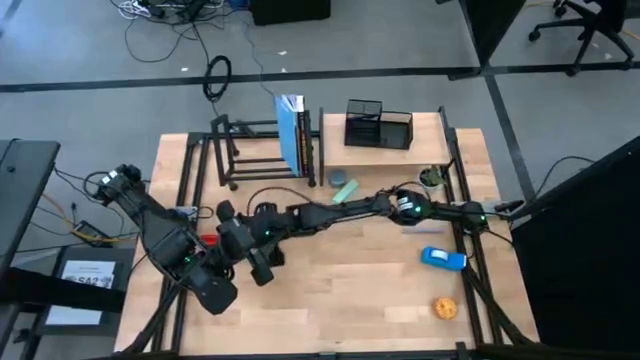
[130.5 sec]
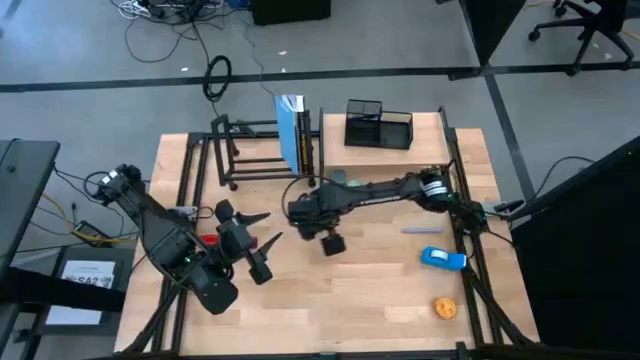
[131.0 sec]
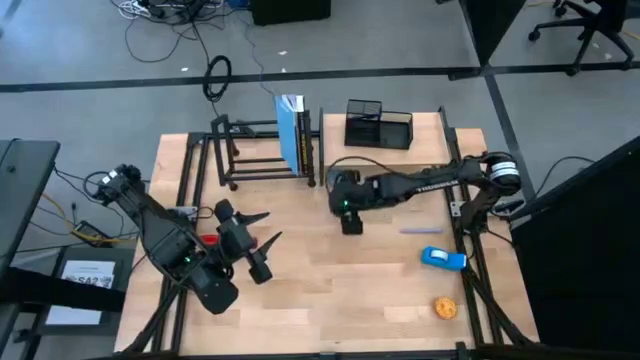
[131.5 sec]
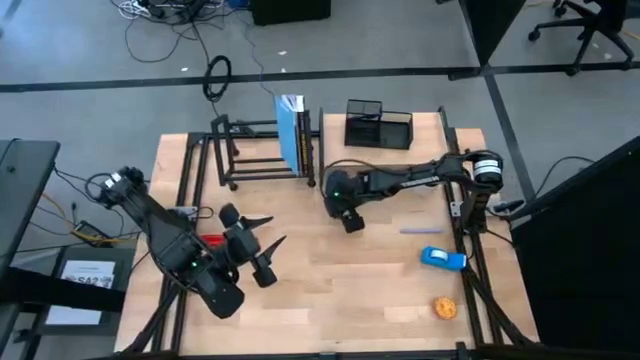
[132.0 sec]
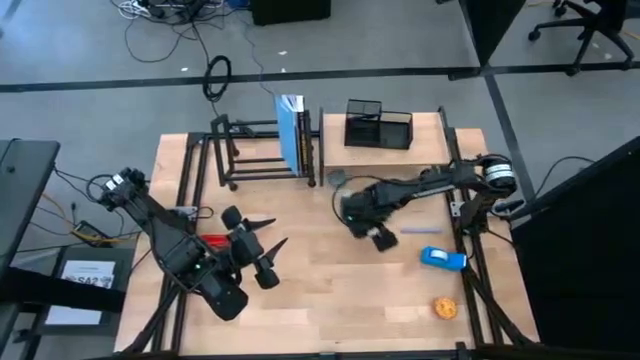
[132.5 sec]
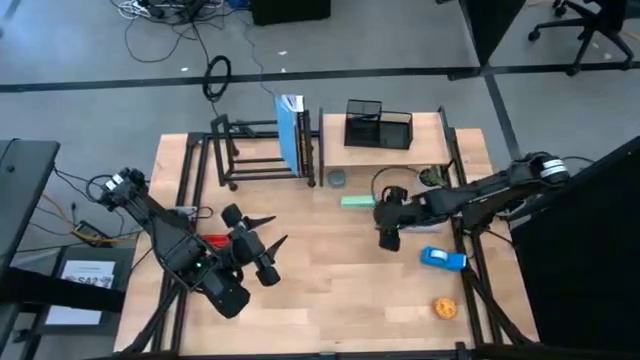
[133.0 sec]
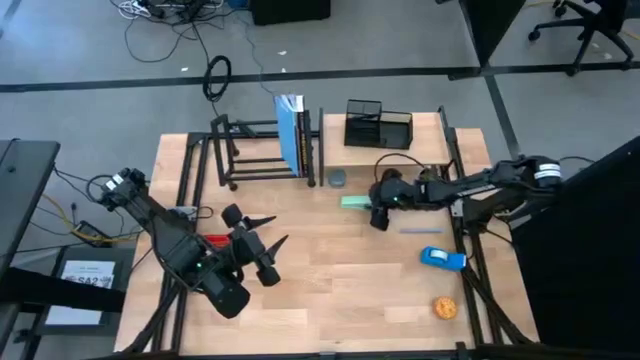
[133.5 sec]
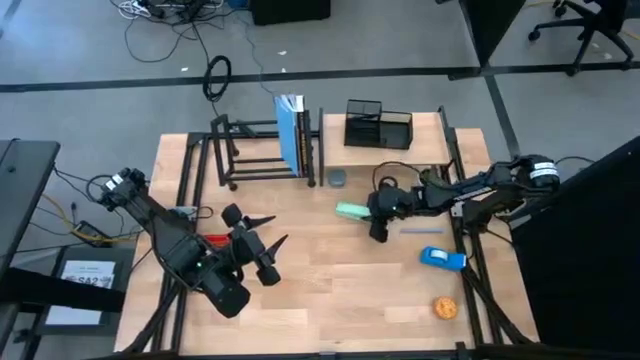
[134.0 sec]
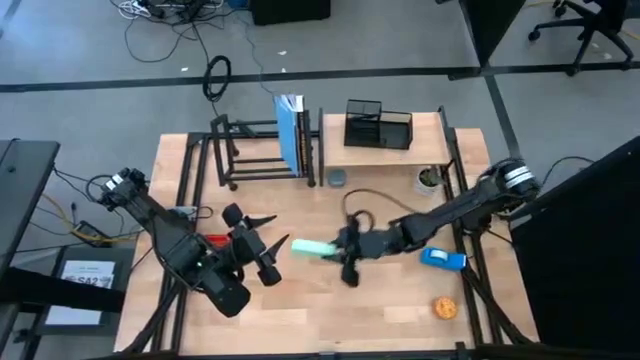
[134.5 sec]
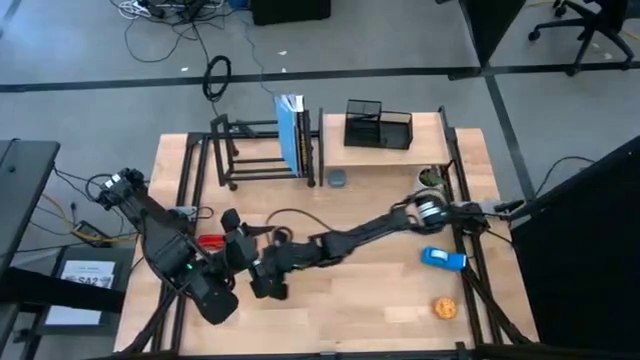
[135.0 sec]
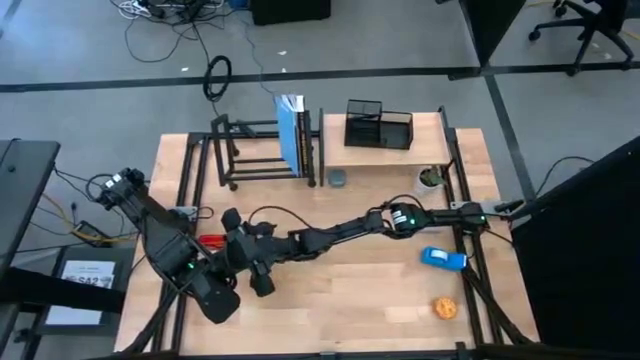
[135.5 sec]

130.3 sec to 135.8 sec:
Task: Stock shelves
Remove the green stapler from under the shelf

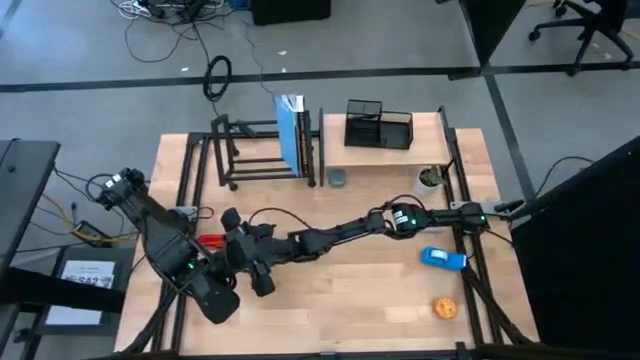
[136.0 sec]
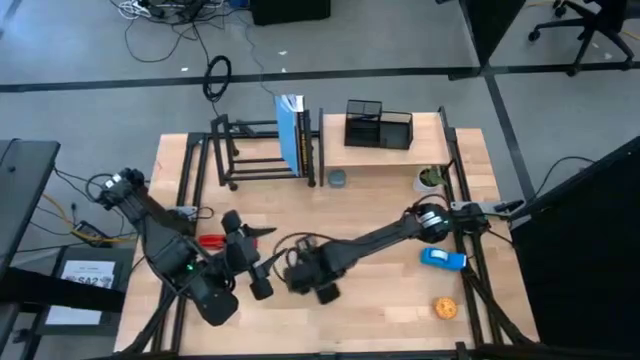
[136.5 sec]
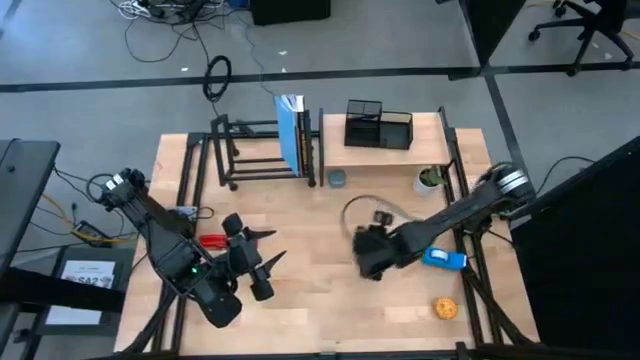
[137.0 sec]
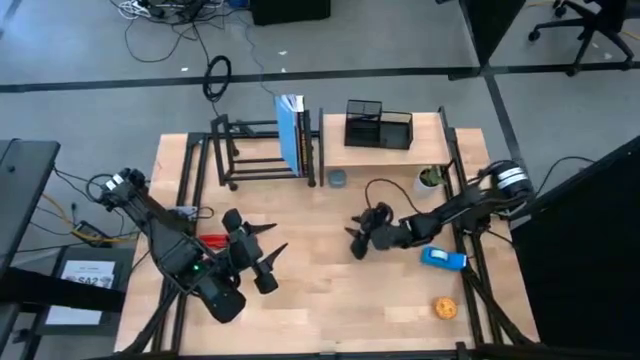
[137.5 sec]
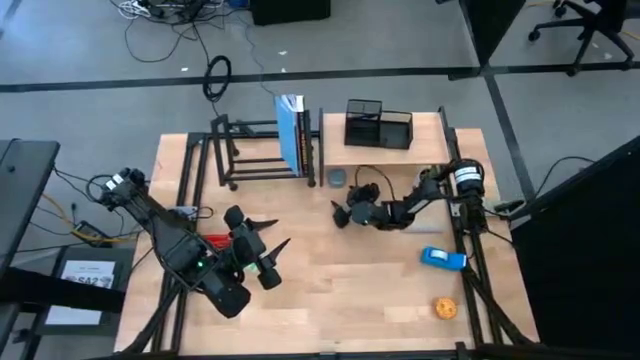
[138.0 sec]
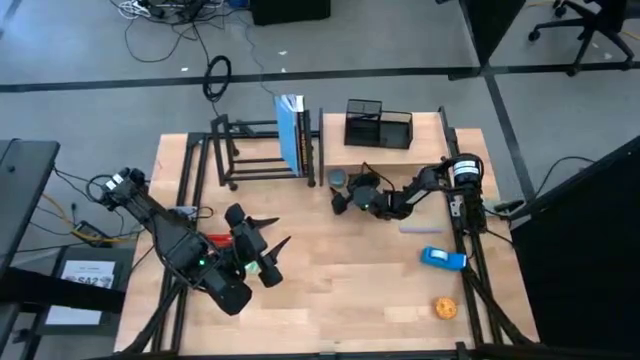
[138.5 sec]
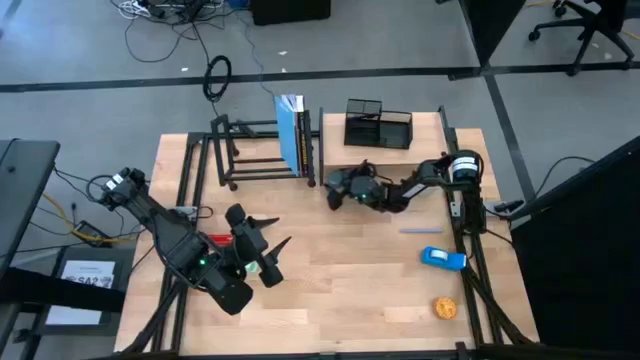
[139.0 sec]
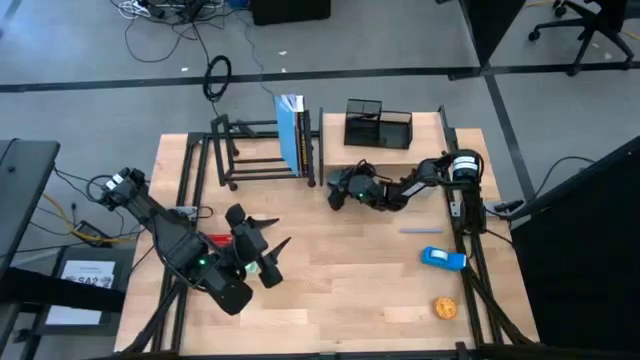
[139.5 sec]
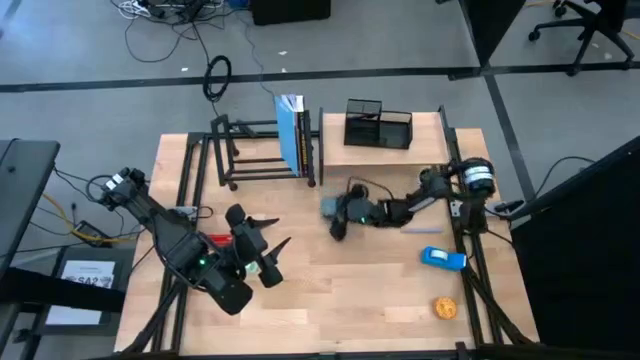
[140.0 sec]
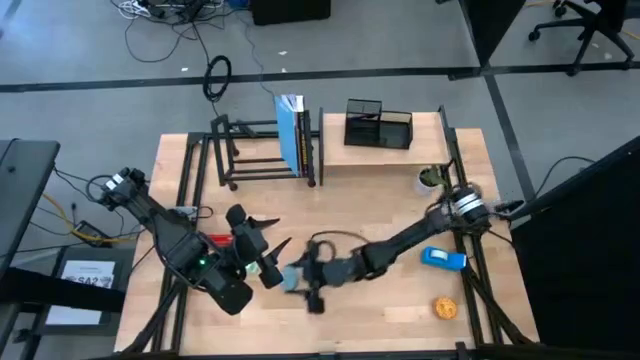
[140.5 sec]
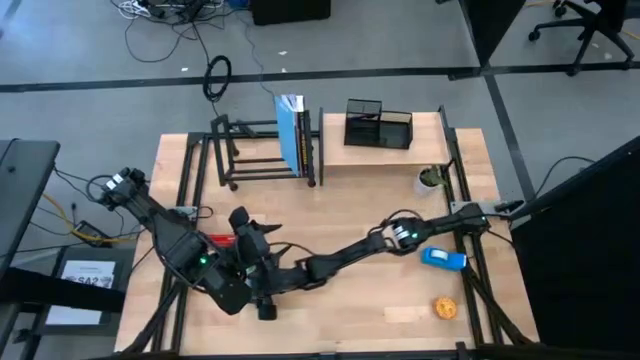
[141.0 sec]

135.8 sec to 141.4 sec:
Remove the green scented candle from under the shelf

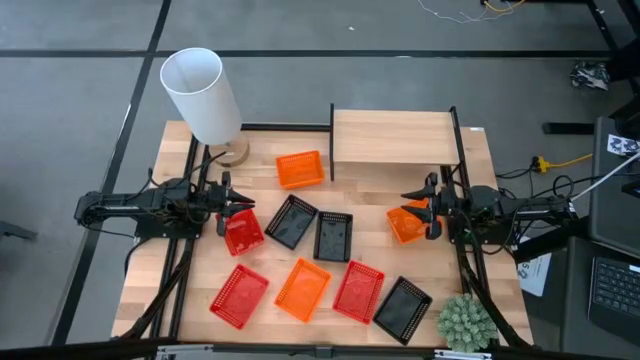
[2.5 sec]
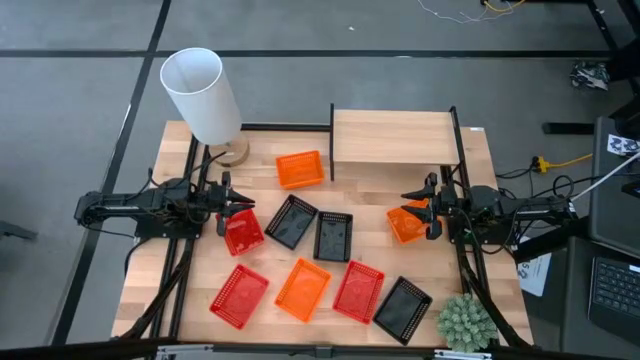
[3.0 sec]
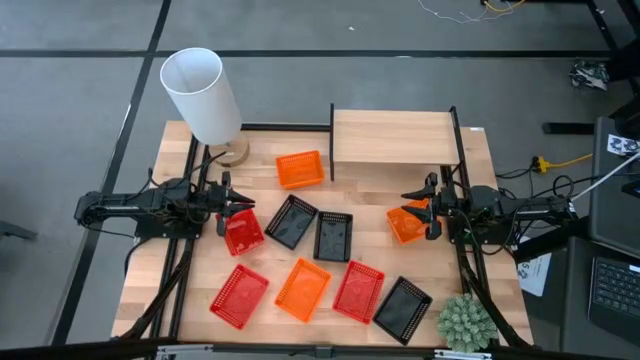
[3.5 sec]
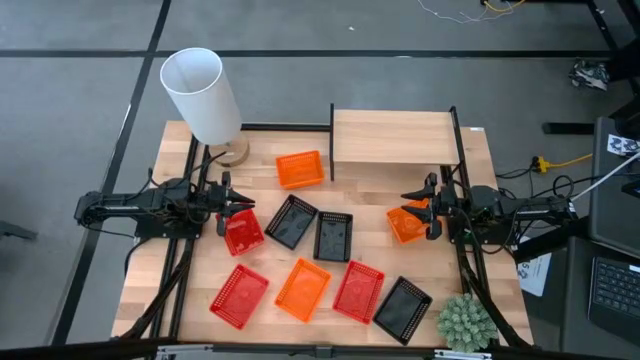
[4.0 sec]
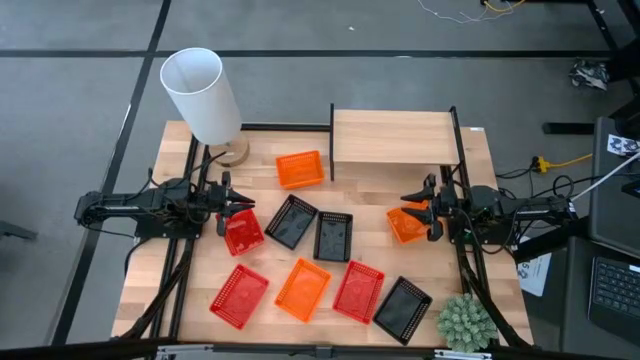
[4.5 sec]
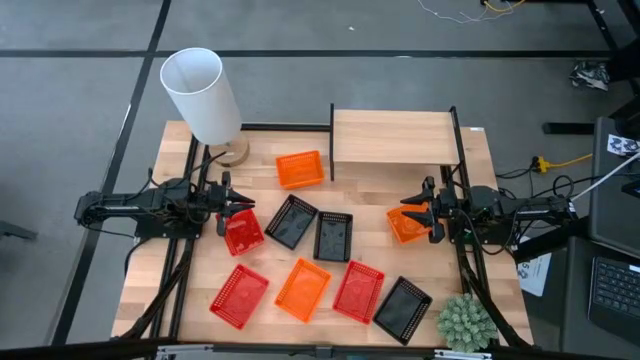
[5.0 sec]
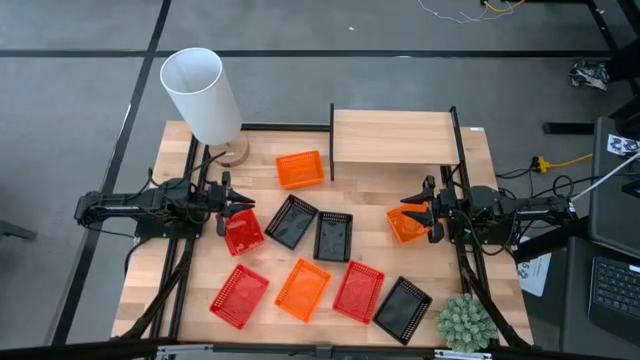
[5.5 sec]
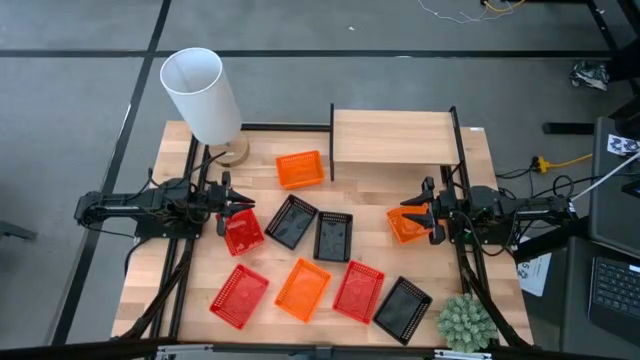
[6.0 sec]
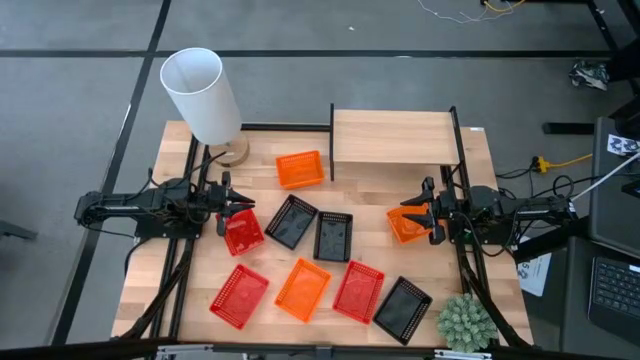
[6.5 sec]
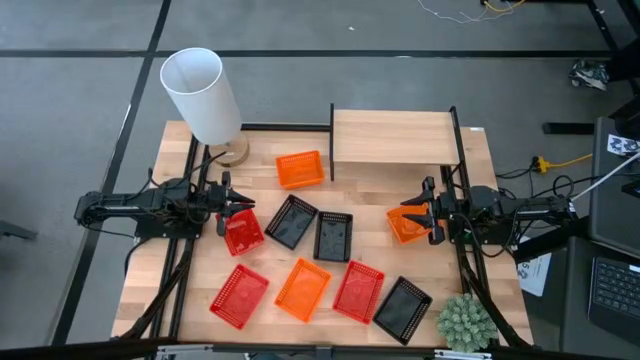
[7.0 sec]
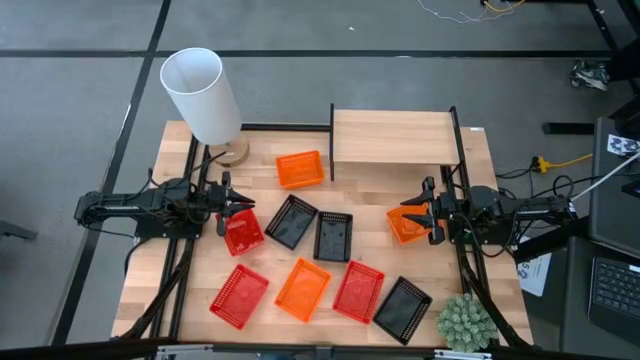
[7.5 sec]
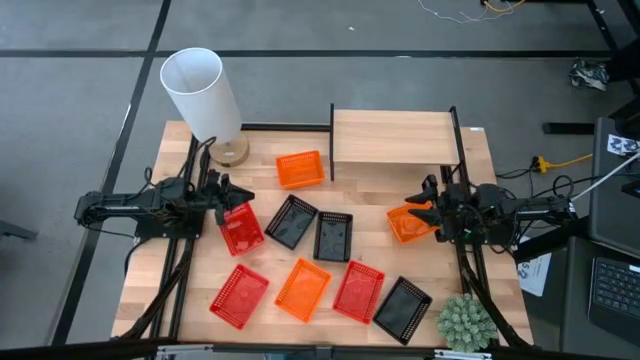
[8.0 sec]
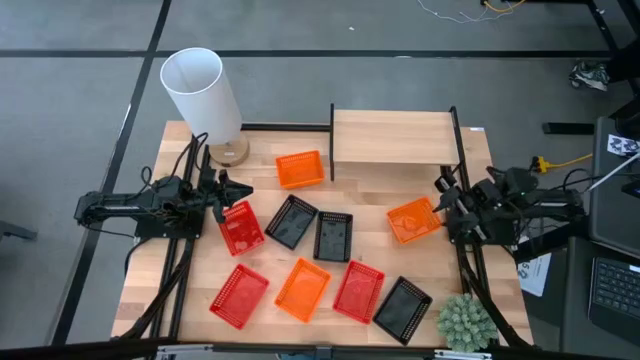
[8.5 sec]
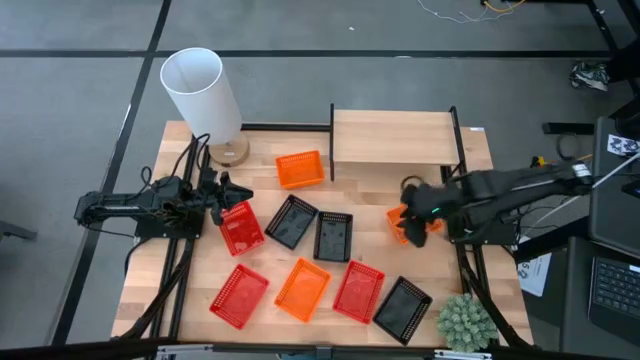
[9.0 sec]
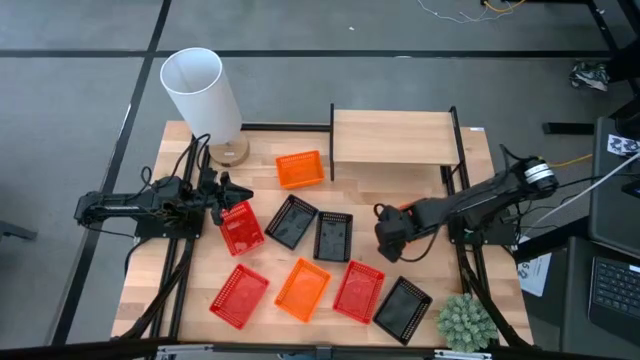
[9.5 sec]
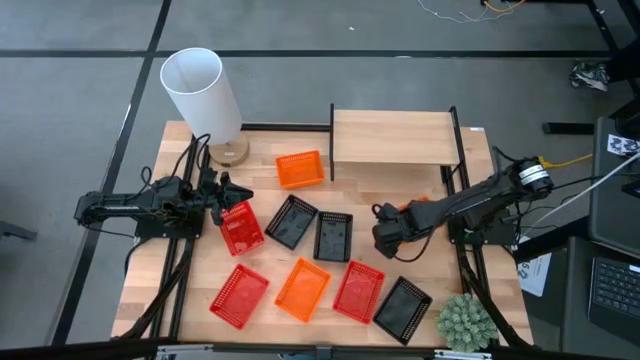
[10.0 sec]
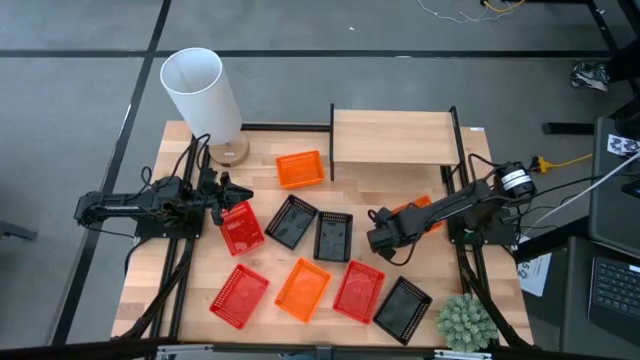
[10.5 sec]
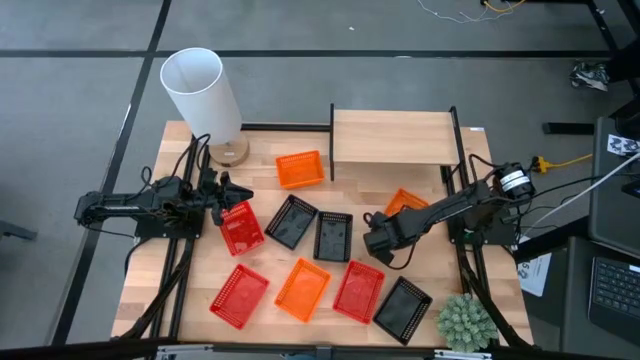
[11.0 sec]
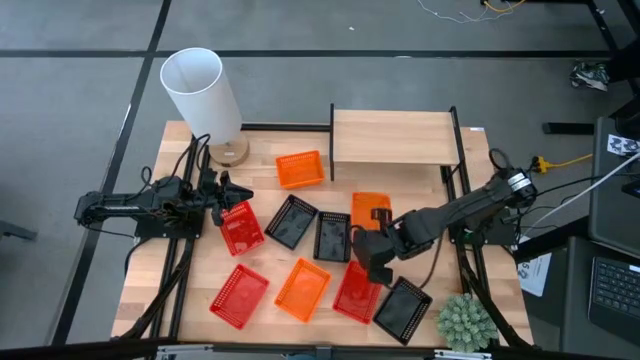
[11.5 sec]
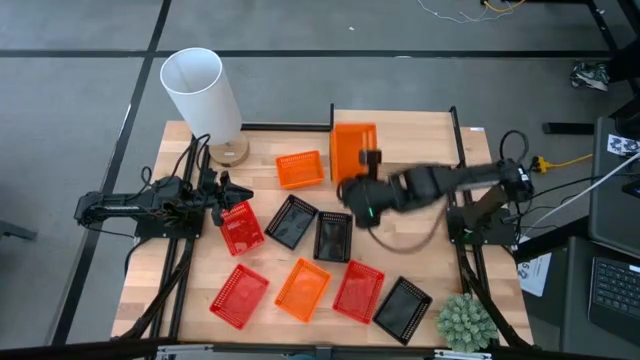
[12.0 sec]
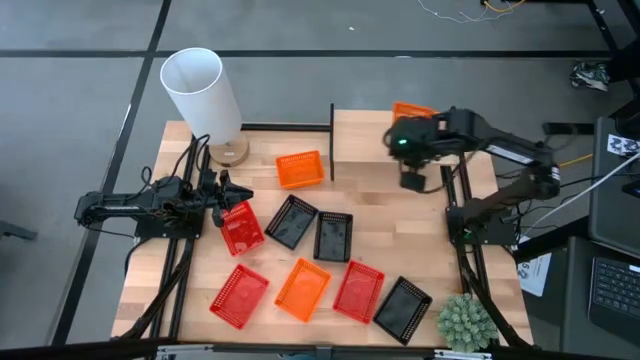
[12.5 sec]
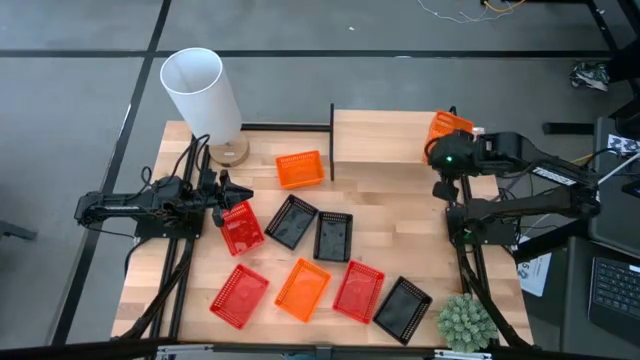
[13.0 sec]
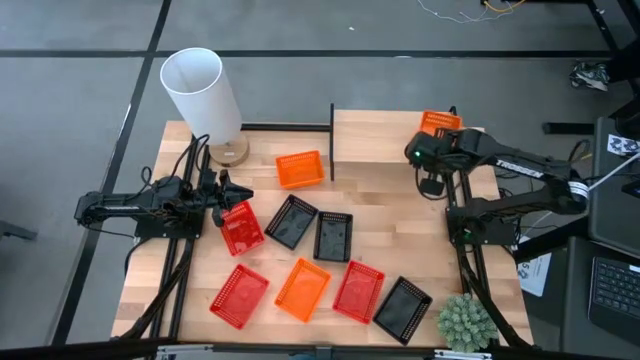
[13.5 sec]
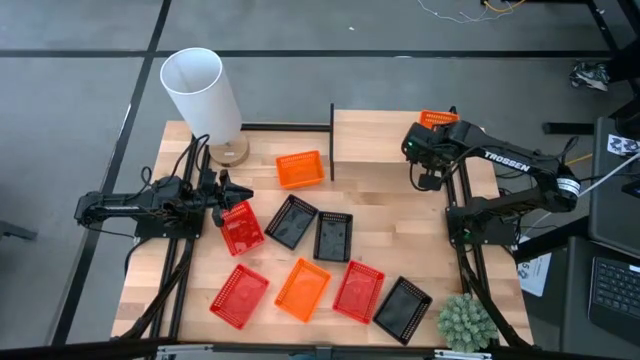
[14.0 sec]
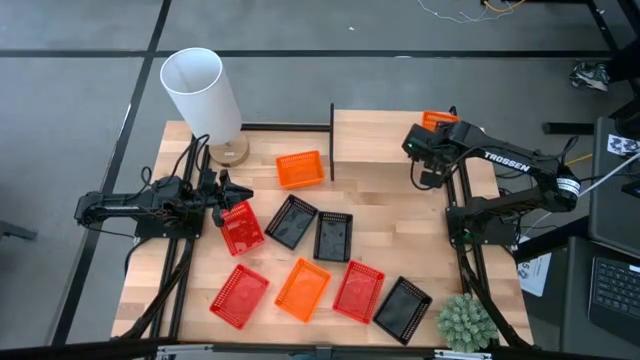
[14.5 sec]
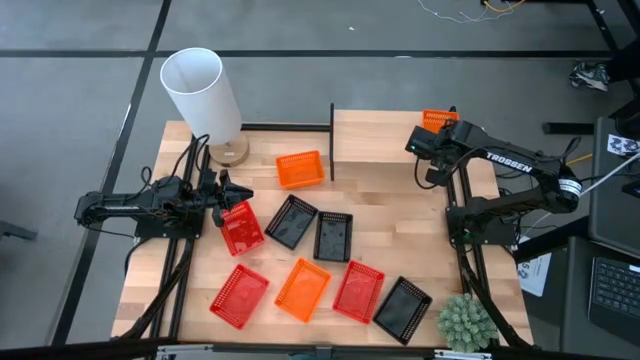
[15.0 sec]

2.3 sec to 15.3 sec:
Task: Stack baskets on shelf by color
Put the middle orange basket on the shelf
